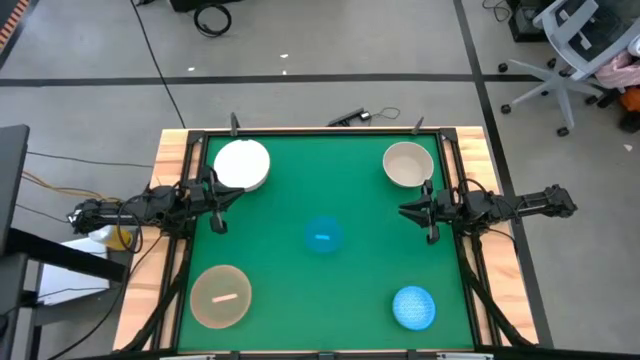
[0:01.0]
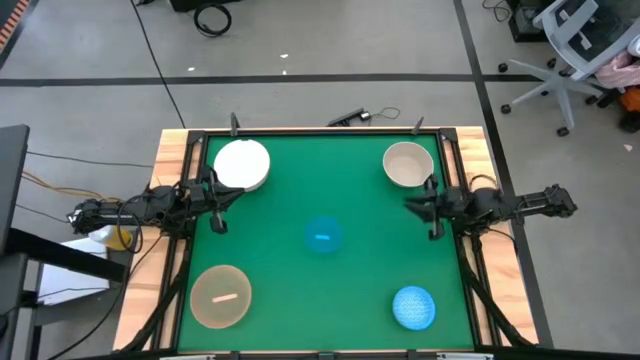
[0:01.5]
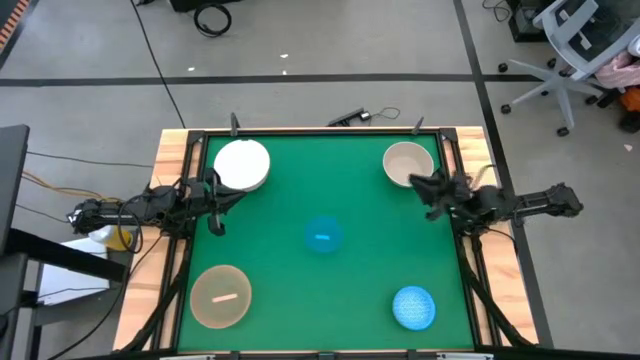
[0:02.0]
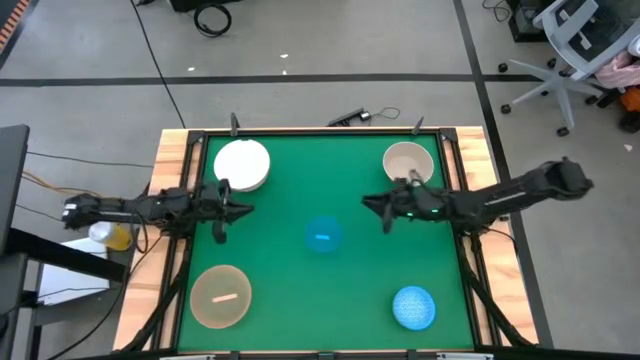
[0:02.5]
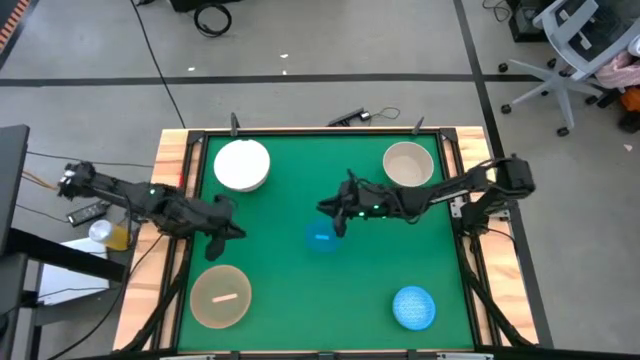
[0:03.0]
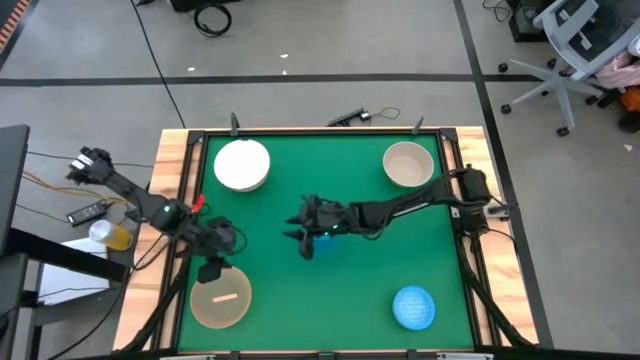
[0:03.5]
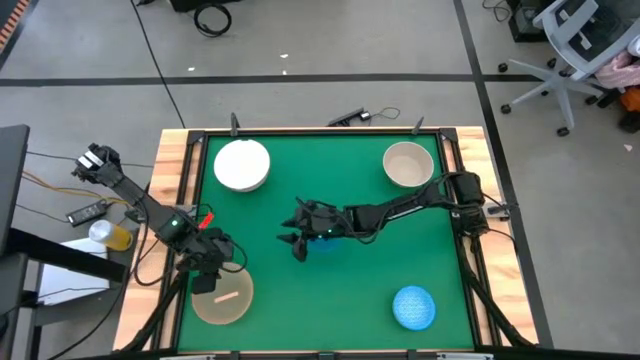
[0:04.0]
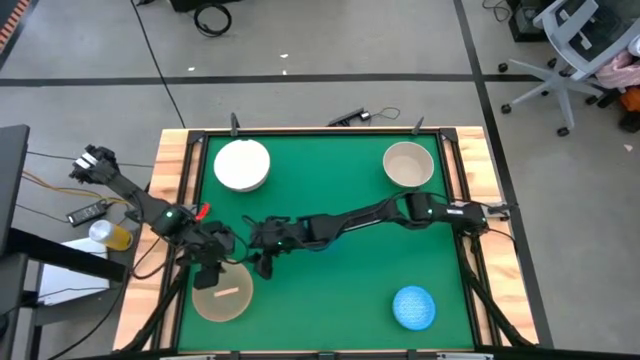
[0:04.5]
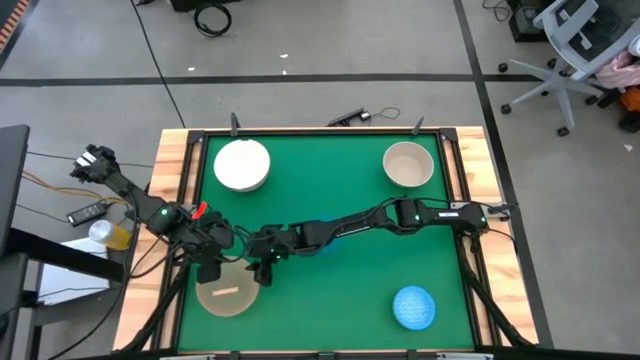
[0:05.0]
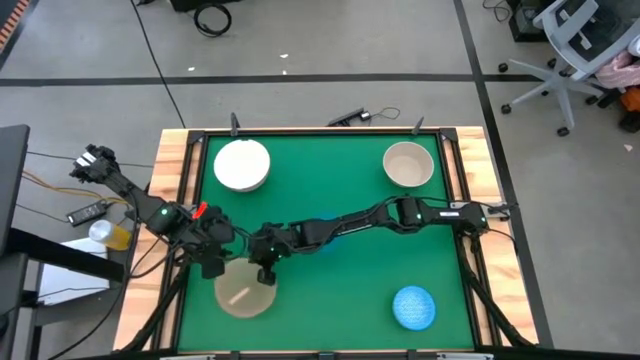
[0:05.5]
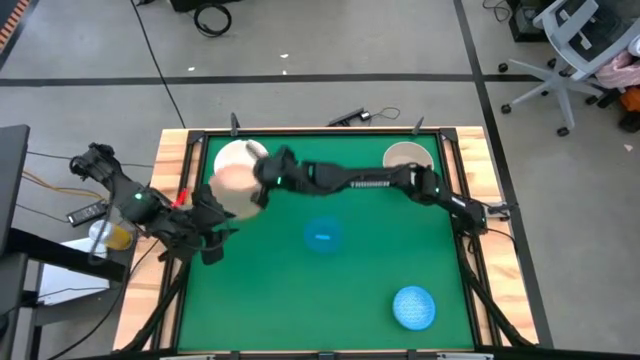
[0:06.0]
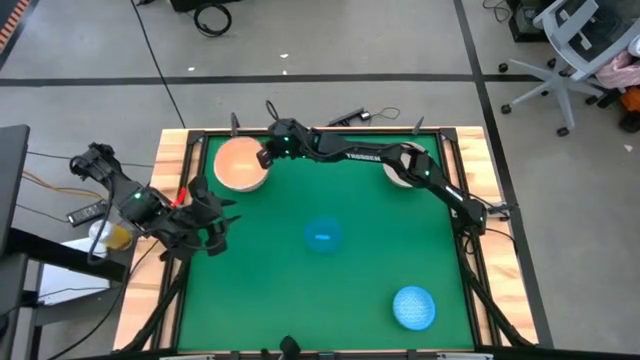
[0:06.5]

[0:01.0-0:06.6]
Stack the light orange bowl on top of the white bowl

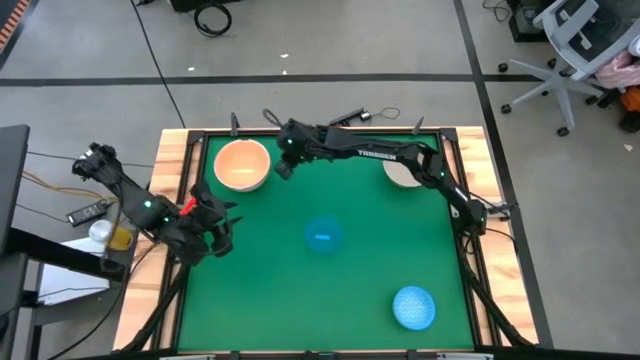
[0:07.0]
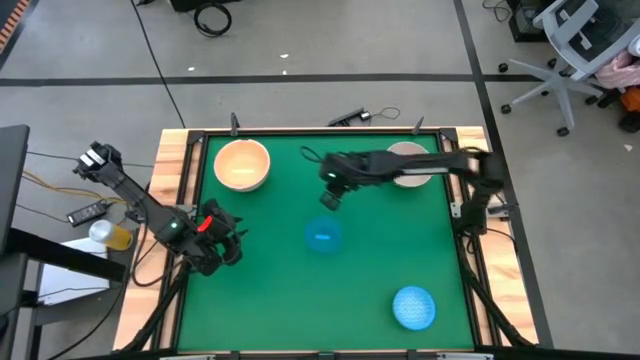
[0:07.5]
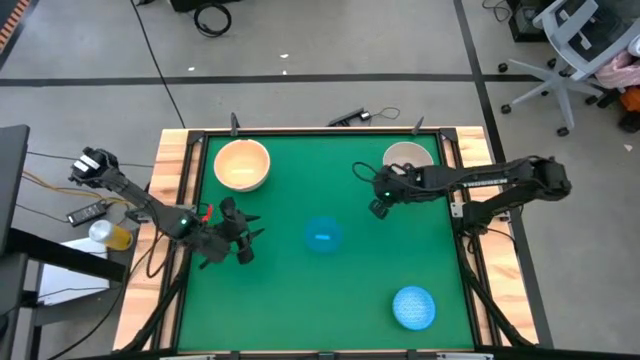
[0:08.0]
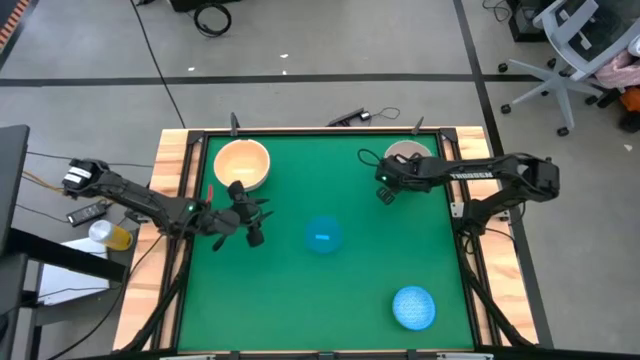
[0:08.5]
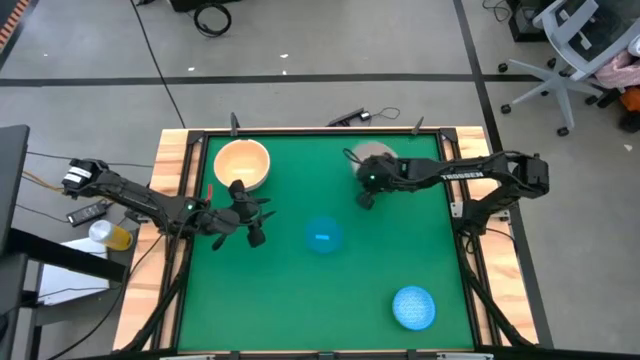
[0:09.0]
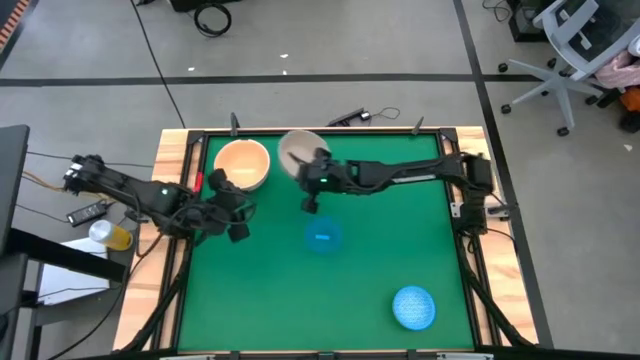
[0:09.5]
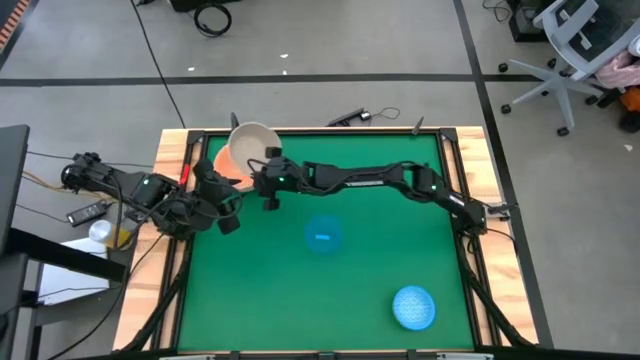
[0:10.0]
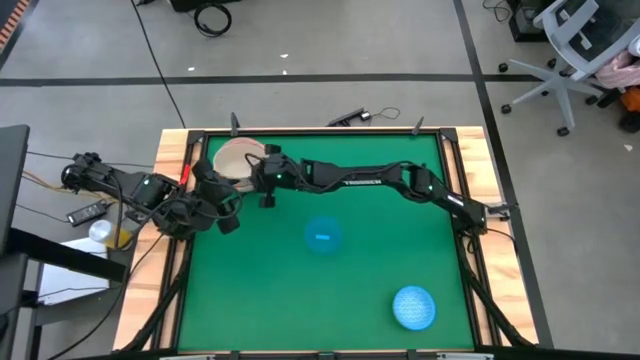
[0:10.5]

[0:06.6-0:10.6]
Stack the gray bowl on top of the light orange bowl

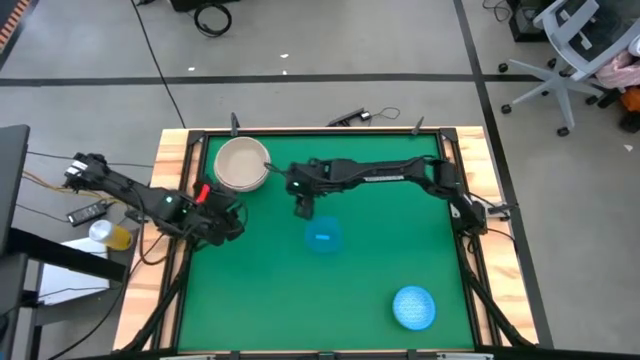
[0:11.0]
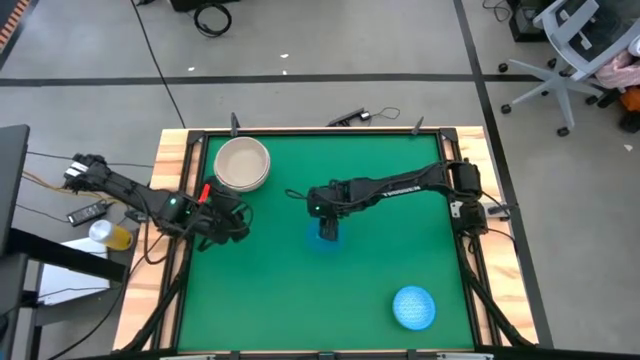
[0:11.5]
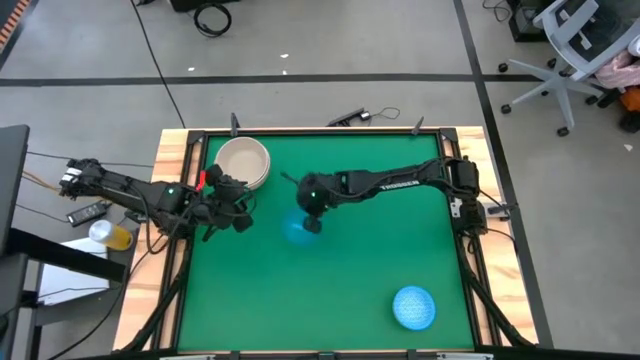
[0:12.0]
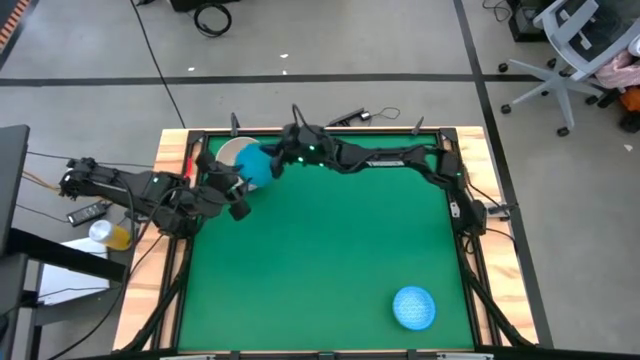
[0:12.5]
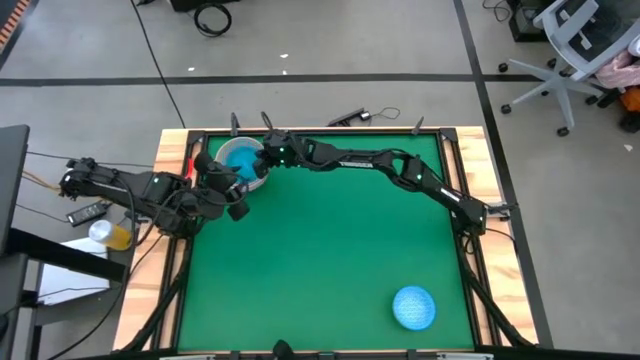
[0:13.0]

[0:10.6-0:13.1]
Stack the blue bowl on top of the gray bowl

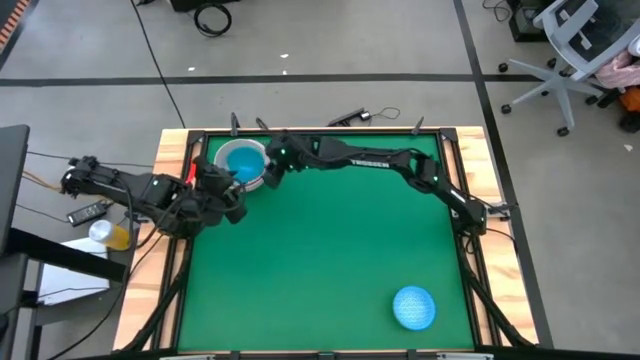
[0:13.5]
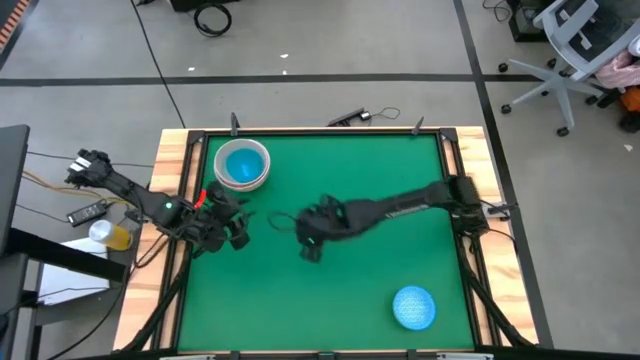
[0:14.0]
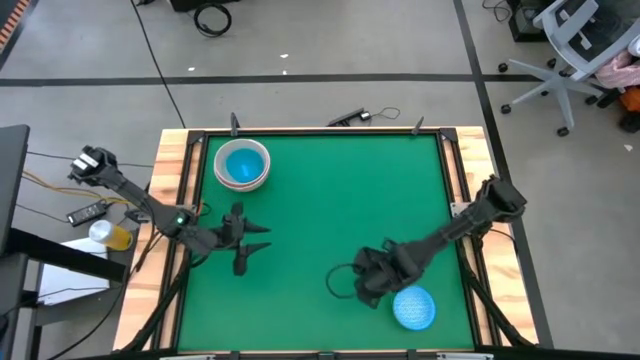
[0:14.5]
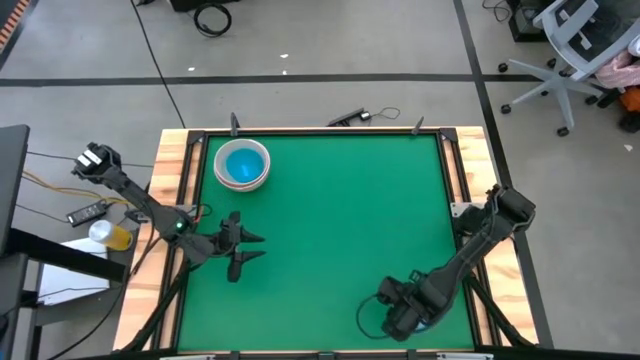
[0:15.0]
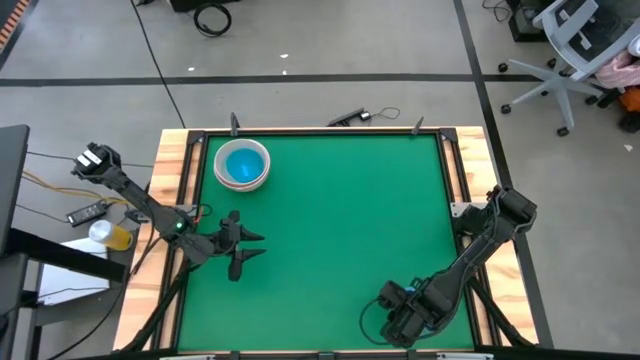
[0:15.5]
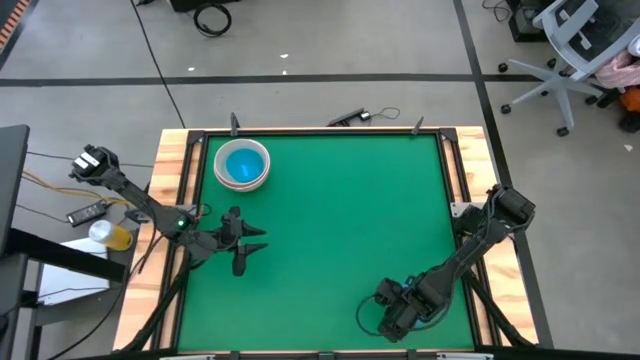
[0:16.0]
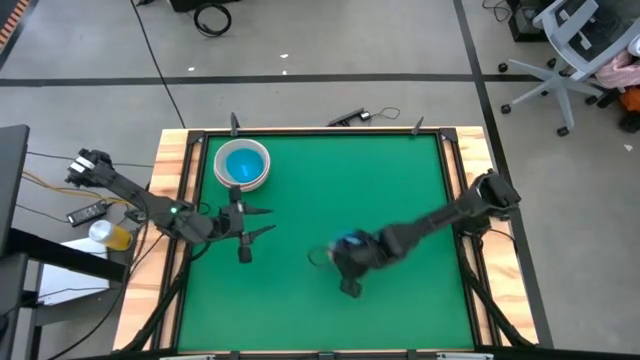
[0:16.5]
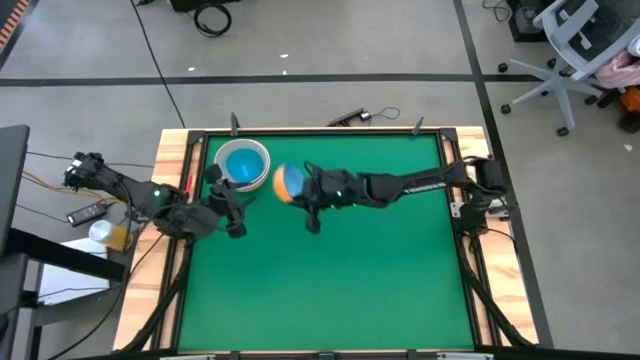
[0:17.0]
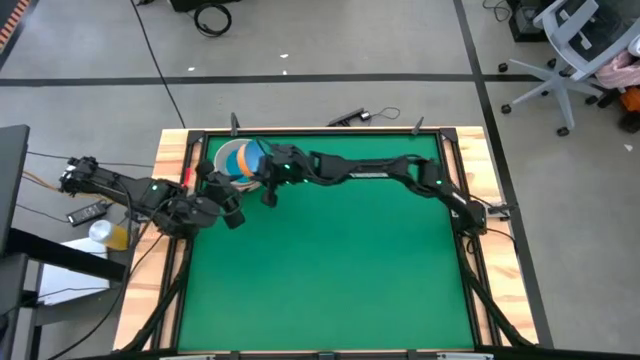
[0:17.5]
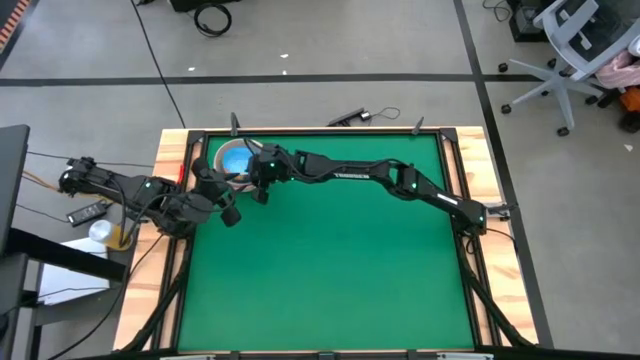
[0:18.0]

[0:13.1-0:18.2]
Stack the blue patterned bowl on top of the blue bowl
